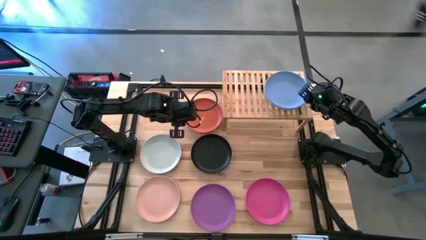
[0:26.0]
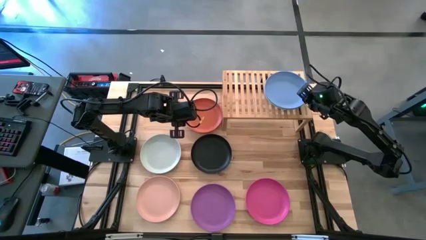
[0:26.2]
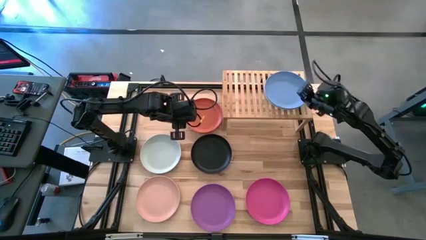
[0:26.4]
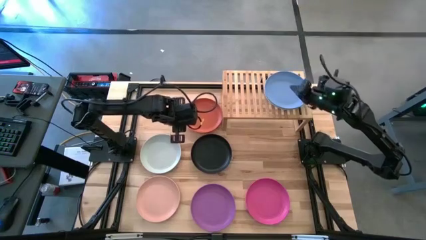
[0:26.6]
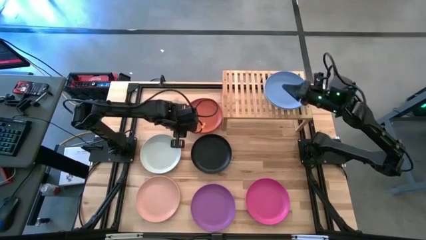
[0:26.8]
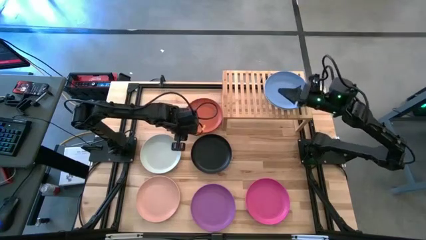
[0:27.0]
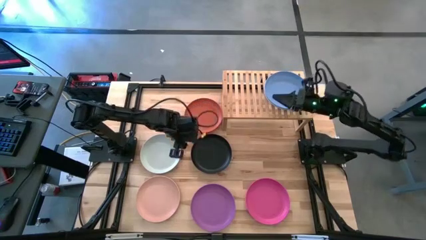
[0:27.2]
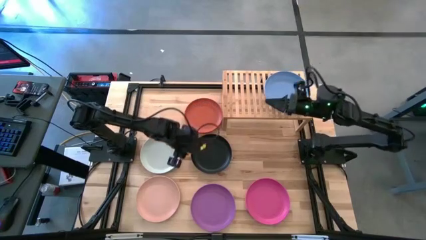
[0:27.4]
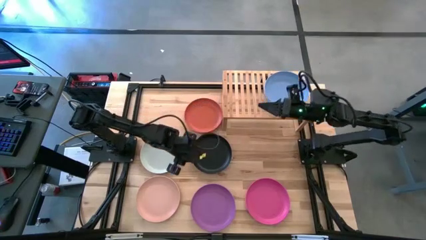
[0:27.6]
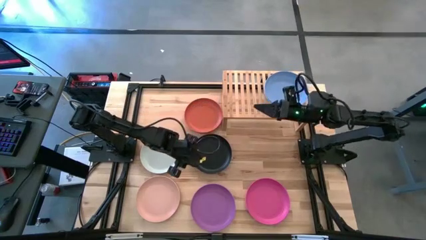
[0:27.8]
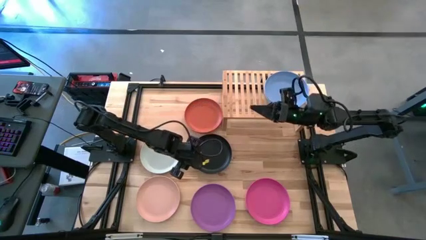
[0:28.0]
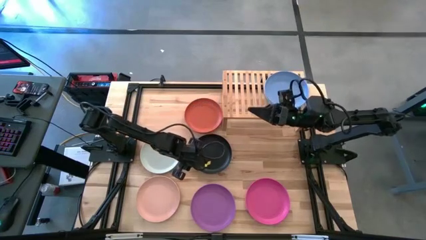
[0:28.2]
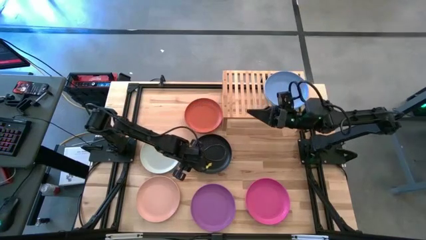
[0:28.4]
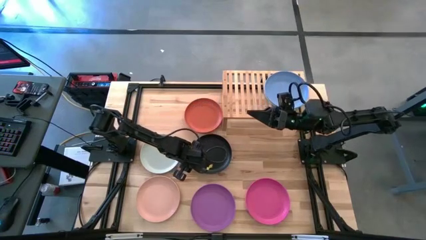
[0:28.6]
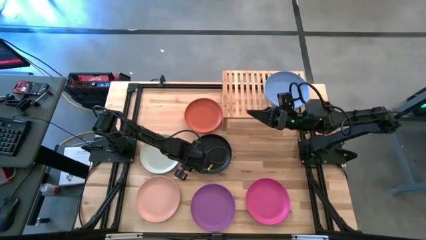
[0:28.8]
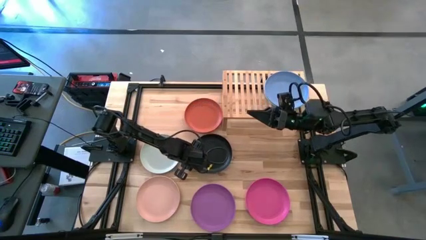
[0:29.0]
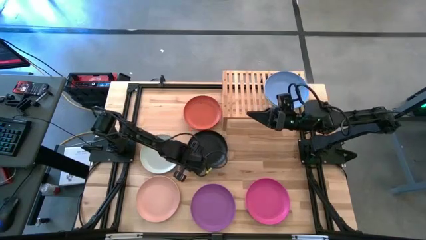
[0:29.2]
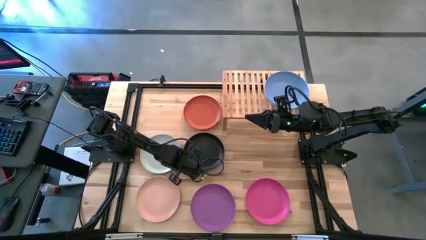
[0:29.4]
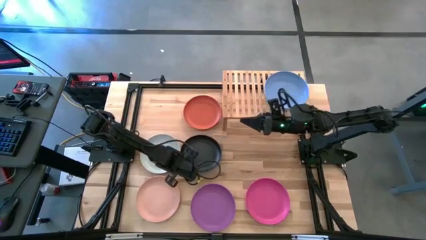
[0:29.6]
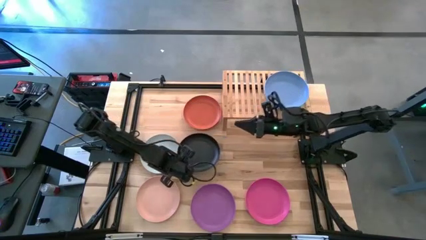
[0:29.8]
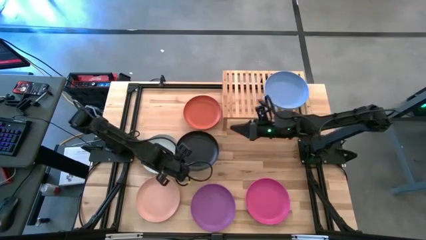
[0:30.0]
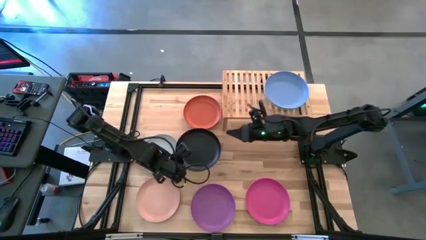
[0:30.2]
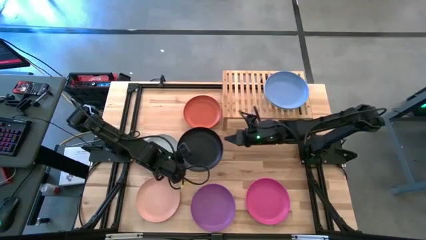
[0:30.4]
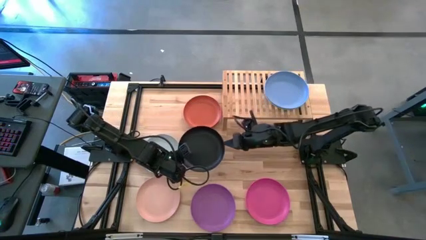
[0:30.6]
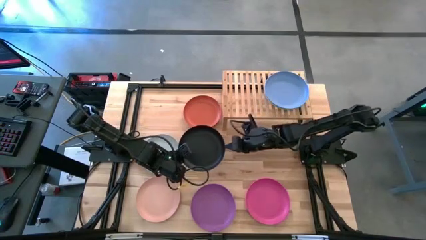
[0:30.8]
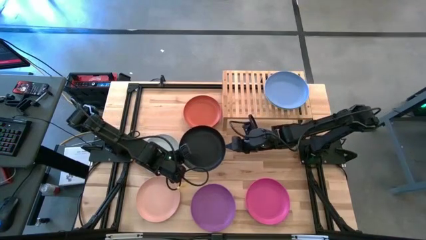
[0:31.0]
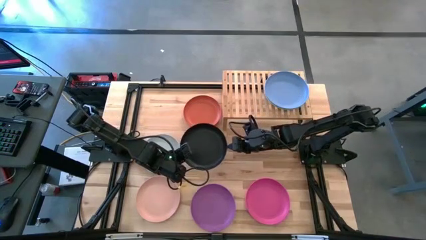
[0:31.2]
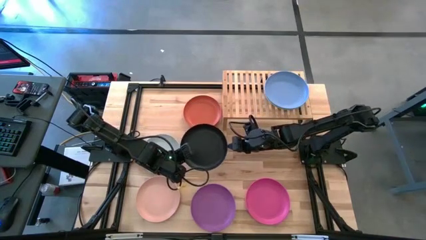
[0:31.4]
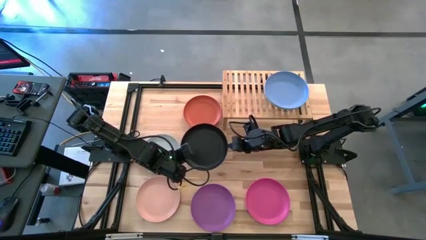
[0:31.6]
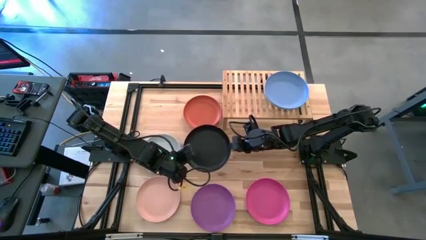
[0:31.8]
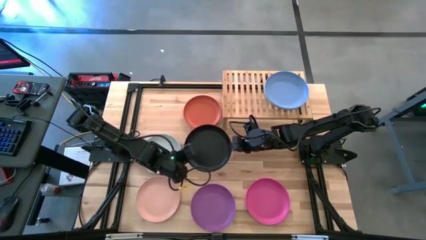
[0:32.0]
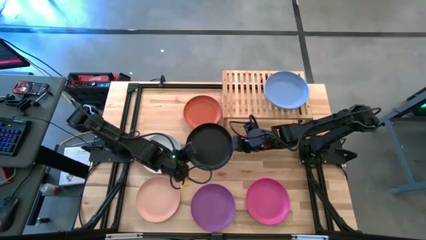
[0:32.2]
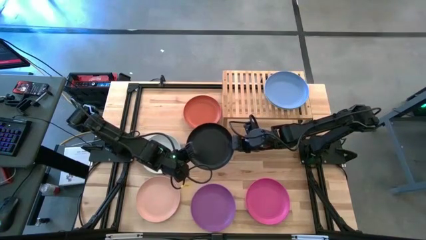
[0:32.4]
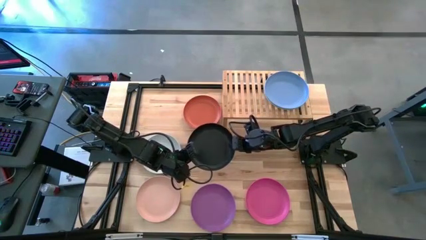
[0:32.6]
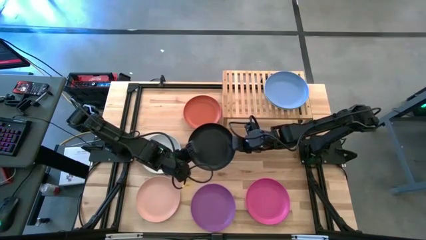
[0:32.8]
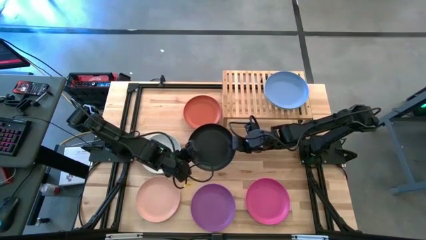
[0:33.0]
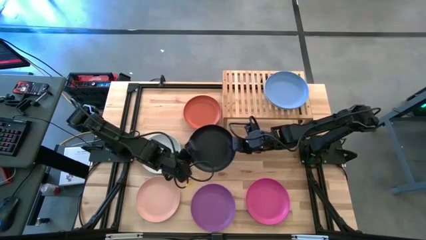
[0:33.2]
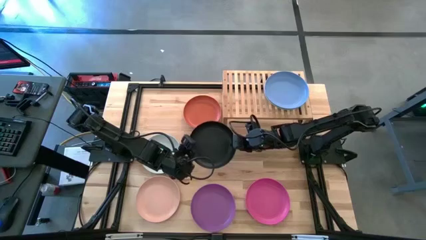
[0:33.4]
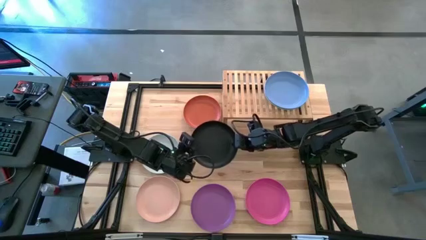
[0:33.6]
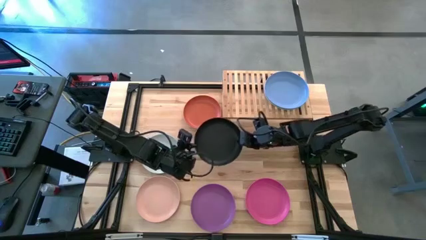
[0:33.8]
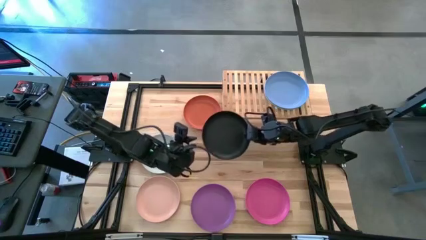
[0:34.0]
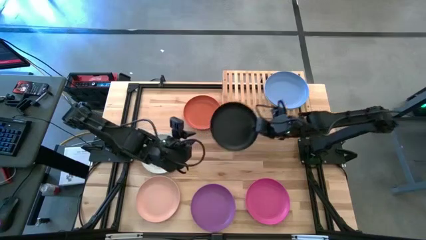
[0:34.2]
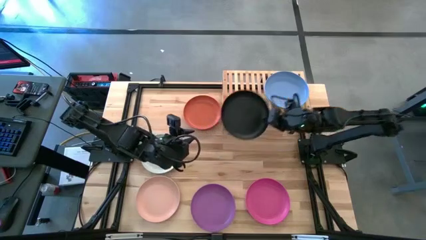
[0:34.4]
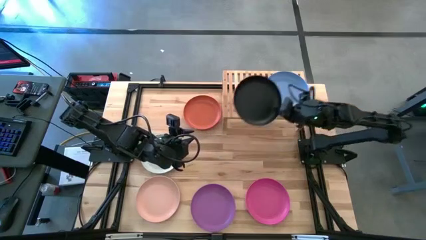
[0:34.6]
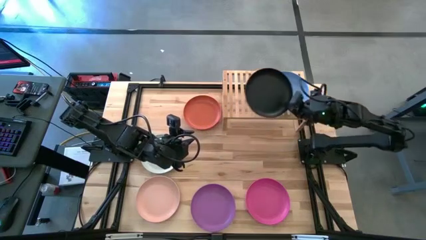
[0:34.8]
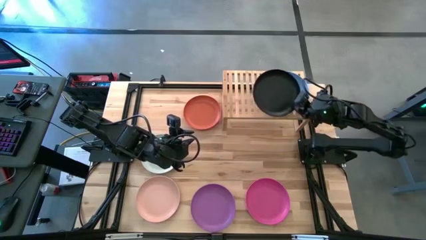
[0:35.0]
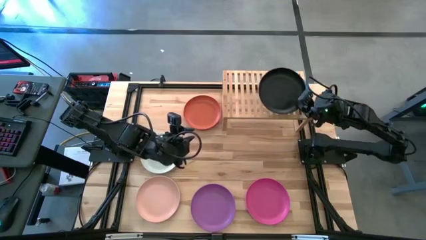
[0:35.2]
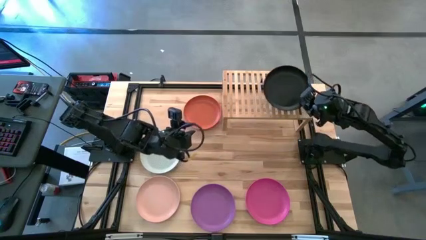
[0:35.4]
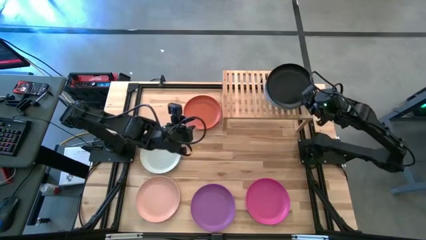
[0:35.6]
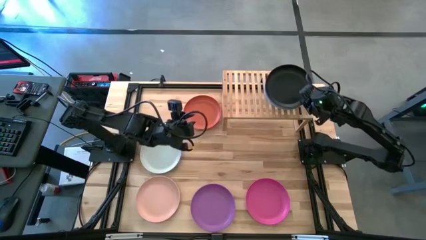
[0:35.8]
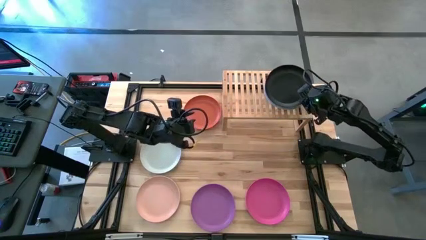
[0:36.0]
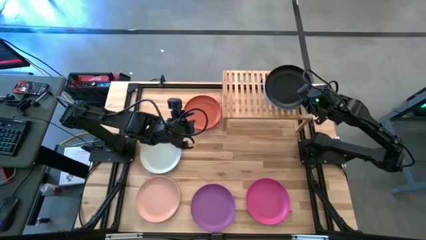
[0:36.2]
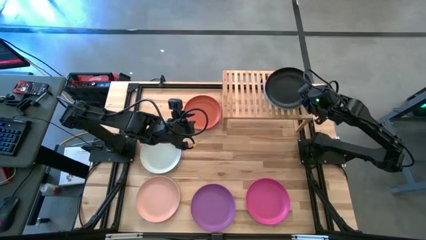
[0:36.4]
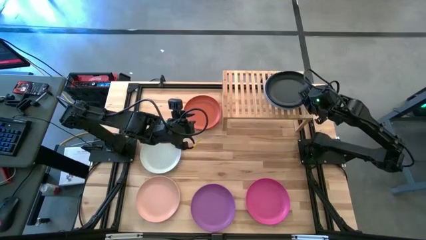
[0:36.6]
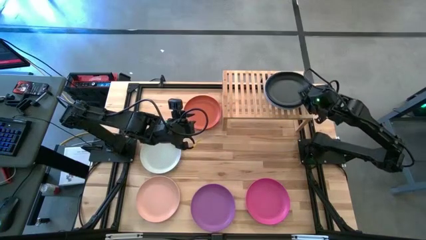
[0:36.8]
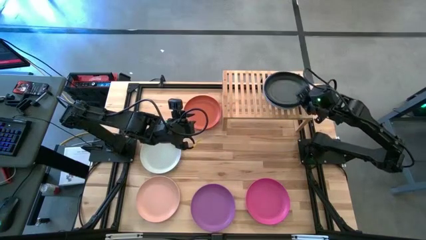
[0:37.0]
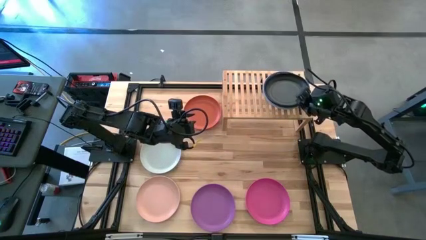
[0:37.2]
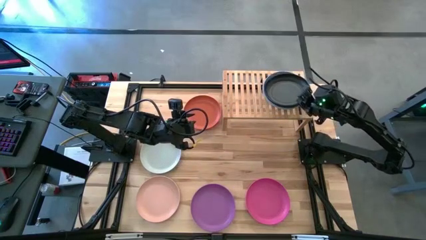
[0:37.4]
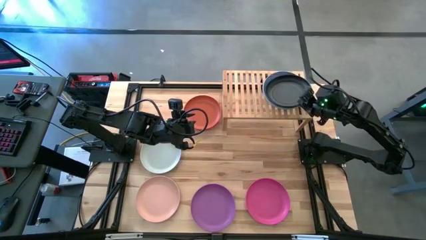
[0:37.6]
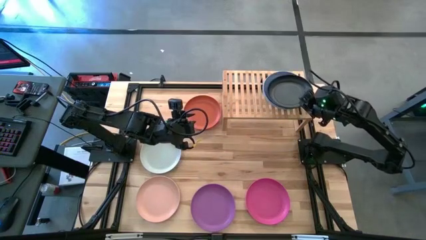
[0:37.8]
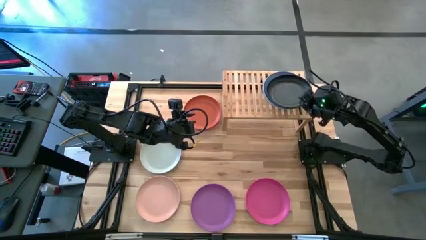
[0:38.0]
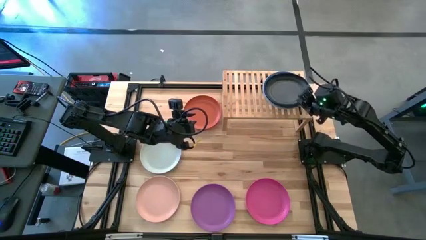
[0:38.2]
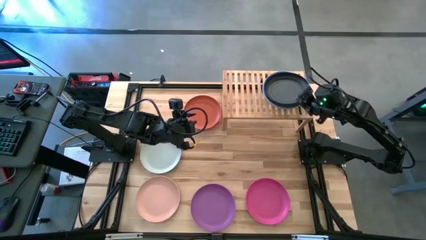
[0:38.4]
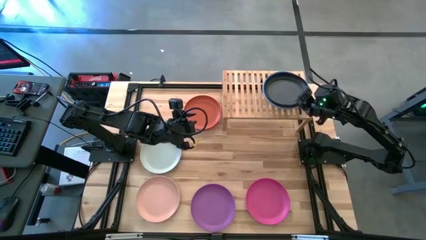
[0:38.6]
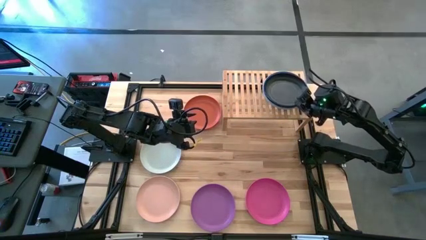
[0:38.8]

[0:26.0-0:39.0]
Task: Place and stack plates onto a shelf
Stack the black plate on top of the blue plate on the shelf

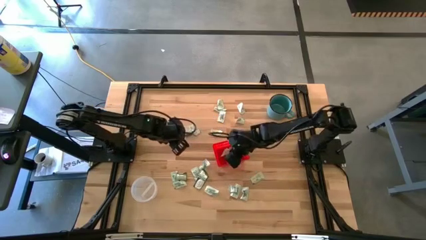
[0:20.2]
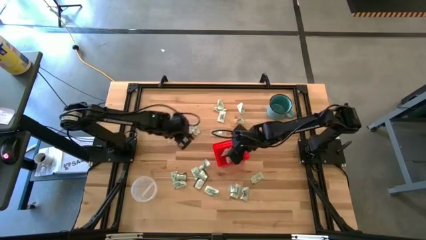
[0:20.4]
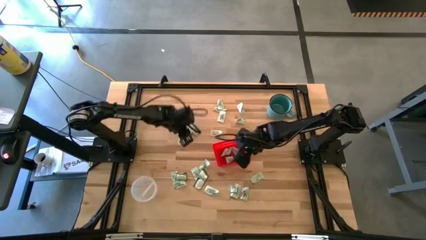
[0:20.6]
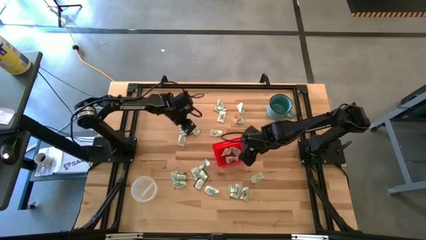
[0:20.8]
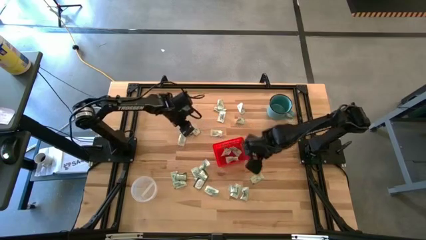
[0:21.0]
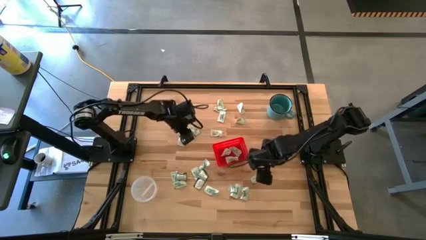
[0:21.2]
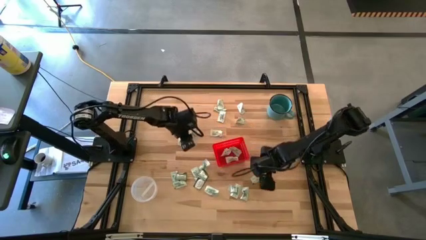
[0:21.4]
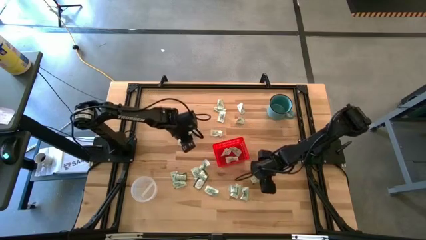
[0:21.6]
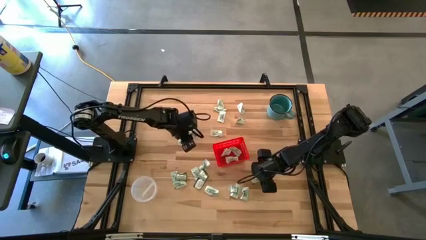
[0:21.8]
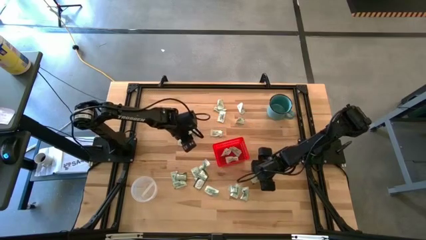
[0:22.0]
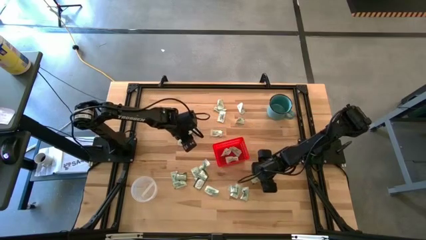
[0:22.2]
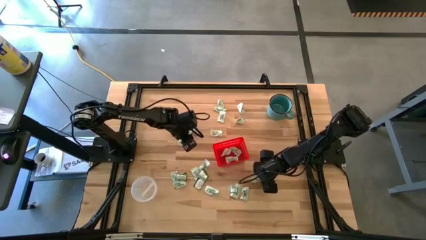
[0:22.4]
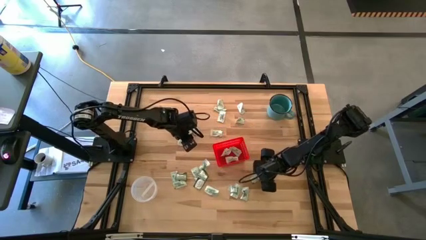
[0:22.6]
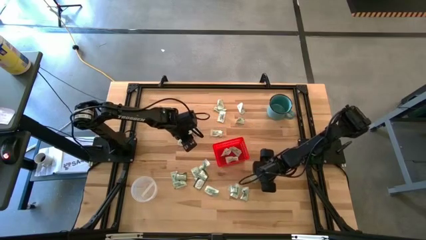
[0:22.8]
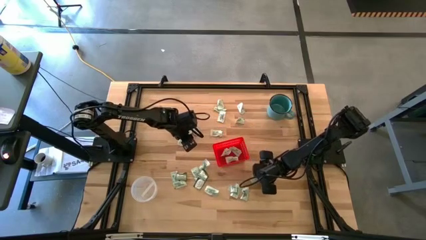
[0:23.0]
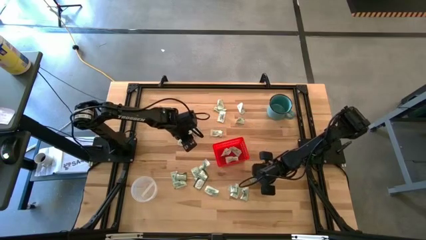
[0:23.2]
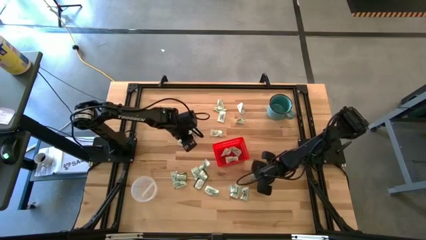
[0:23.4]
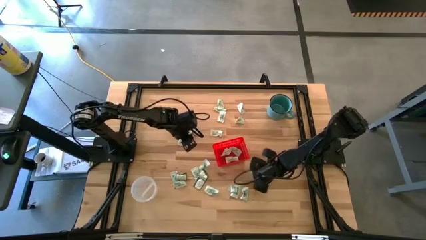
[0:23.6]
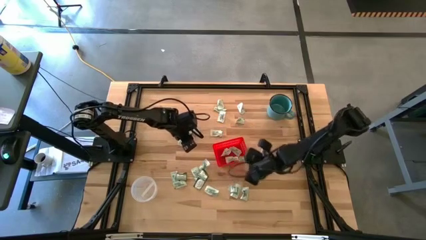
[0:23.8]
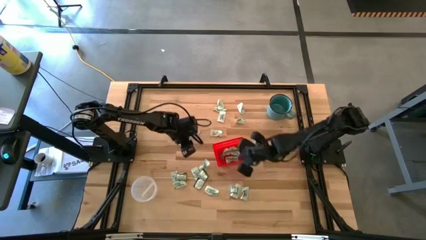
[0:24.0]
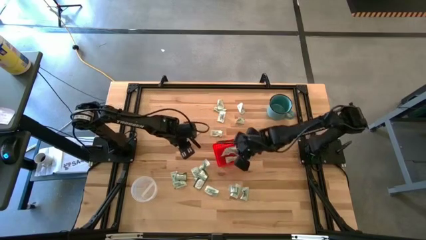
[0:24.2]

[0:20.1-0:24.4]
Task: Pick and place items into bin
Put the white stevia pack into the red bin
